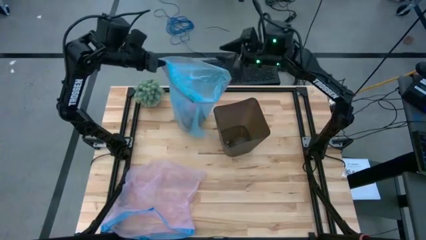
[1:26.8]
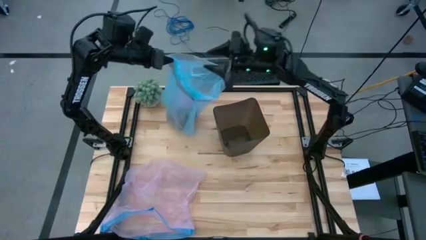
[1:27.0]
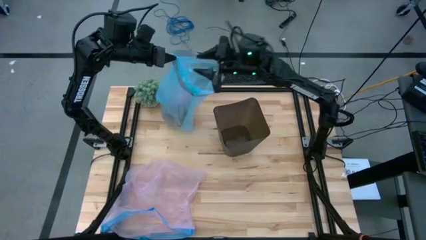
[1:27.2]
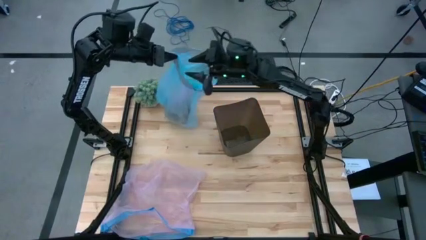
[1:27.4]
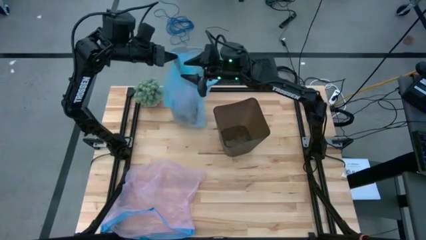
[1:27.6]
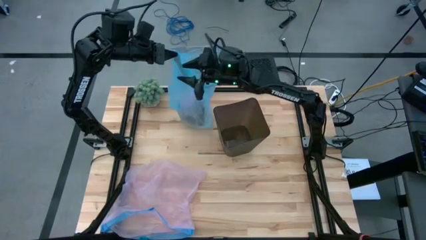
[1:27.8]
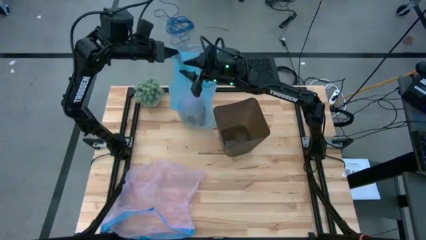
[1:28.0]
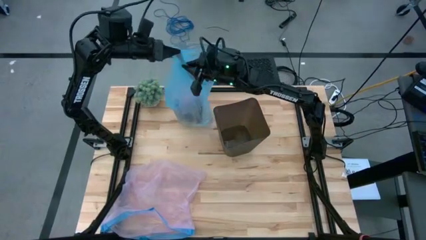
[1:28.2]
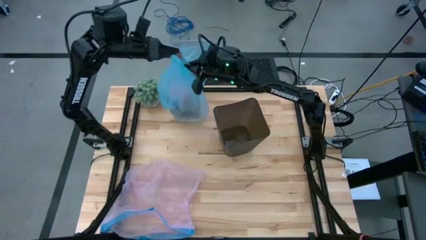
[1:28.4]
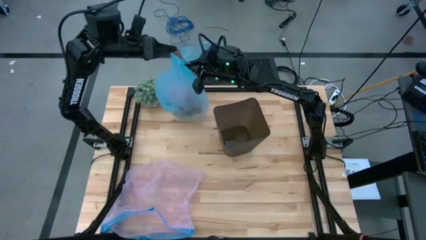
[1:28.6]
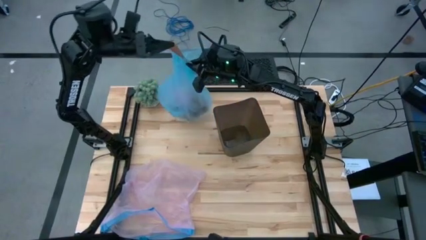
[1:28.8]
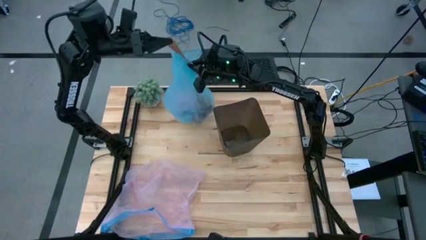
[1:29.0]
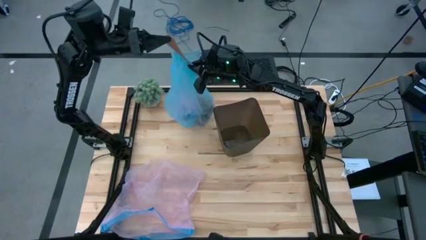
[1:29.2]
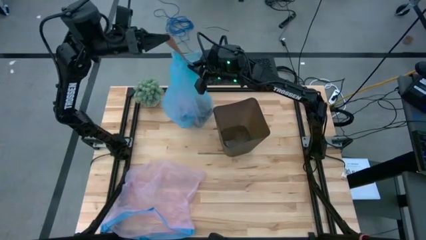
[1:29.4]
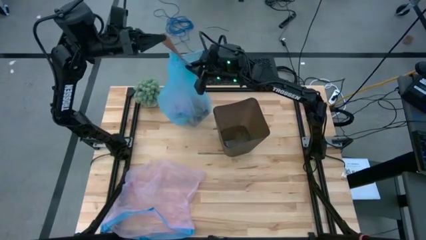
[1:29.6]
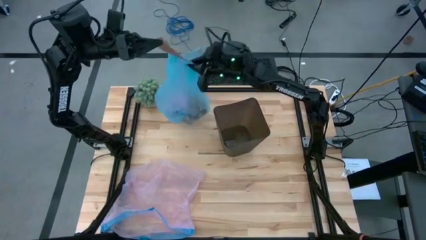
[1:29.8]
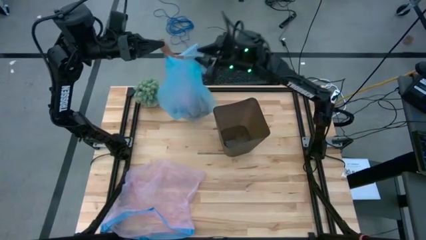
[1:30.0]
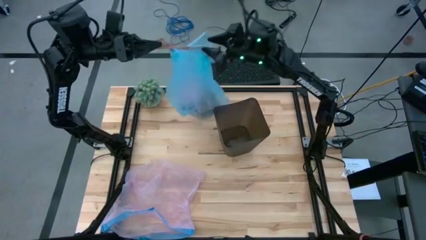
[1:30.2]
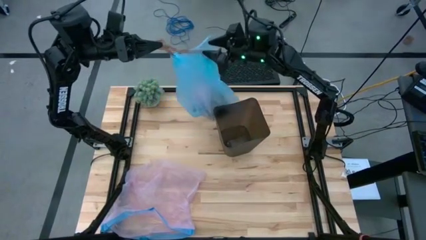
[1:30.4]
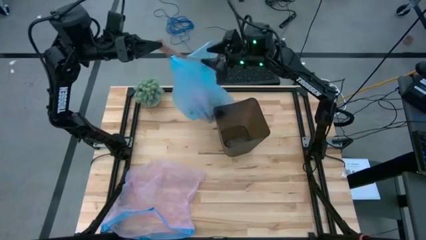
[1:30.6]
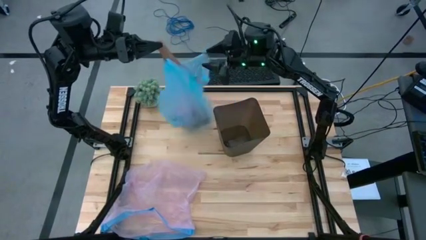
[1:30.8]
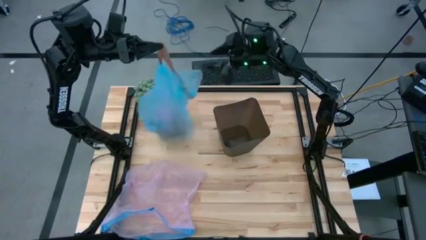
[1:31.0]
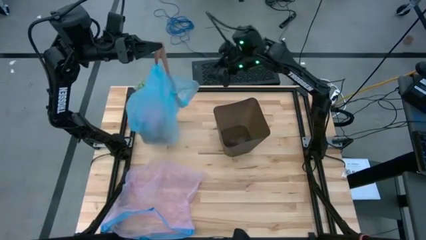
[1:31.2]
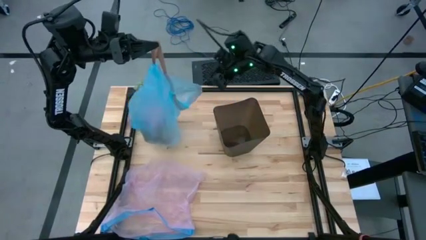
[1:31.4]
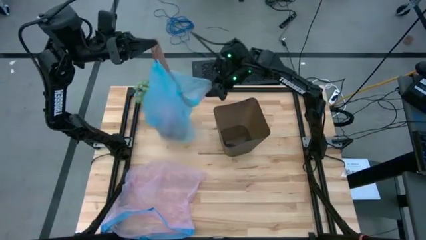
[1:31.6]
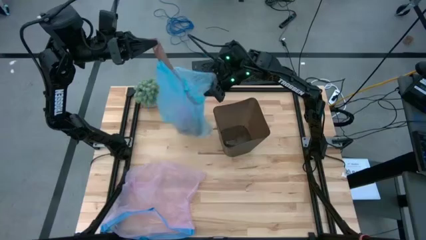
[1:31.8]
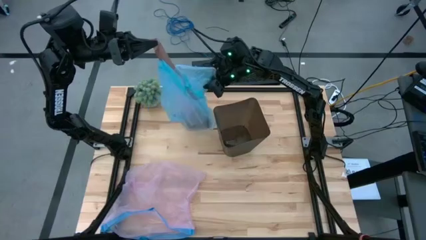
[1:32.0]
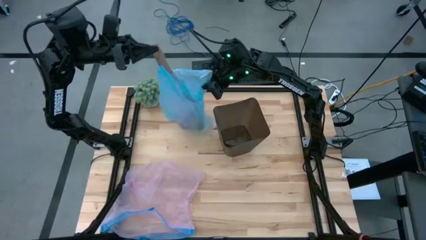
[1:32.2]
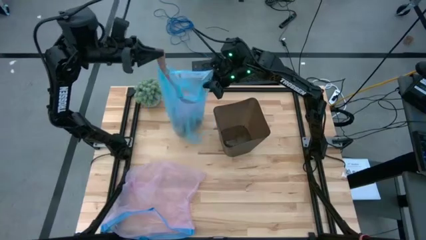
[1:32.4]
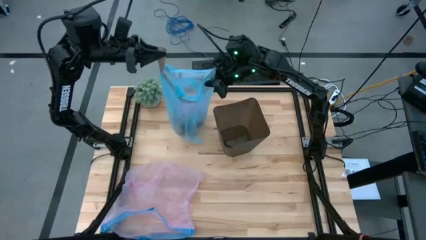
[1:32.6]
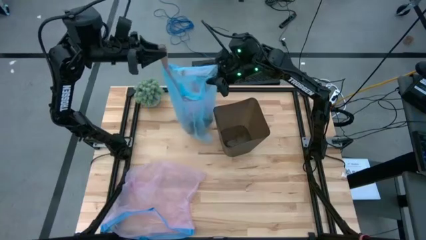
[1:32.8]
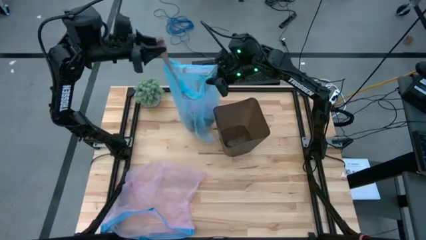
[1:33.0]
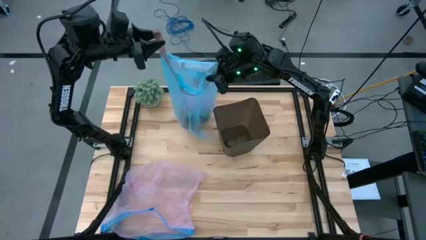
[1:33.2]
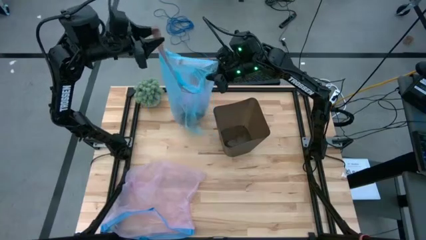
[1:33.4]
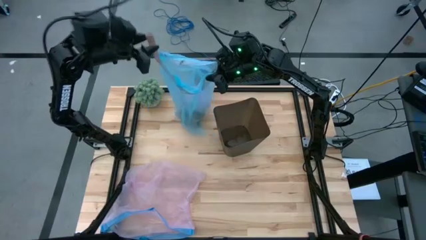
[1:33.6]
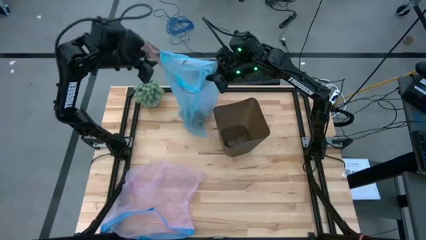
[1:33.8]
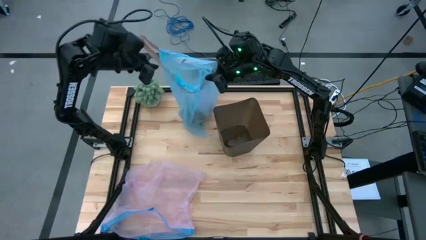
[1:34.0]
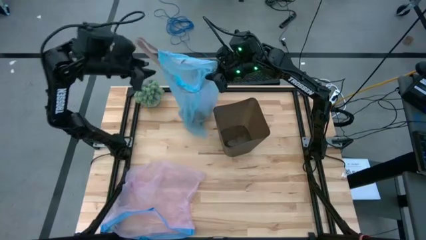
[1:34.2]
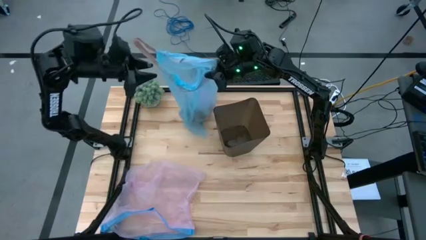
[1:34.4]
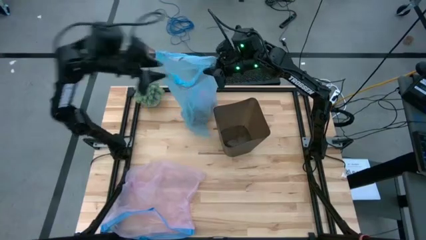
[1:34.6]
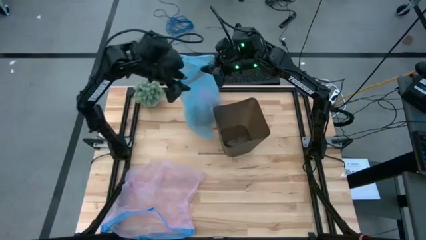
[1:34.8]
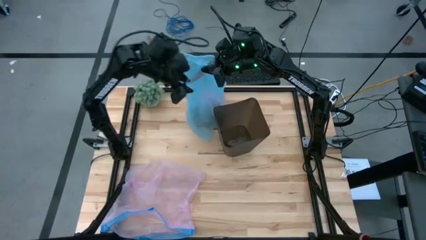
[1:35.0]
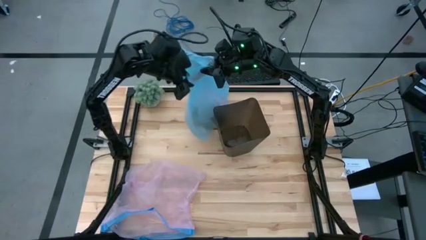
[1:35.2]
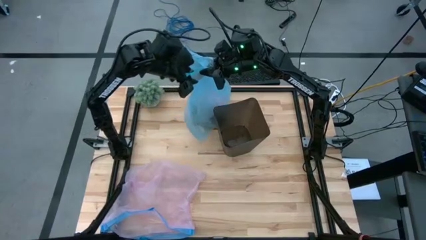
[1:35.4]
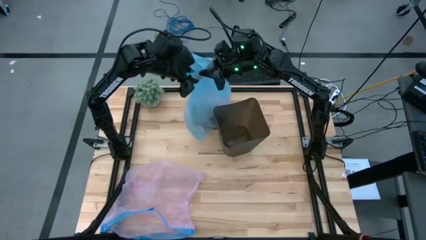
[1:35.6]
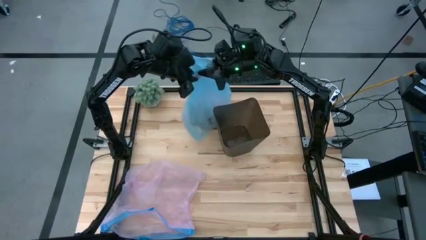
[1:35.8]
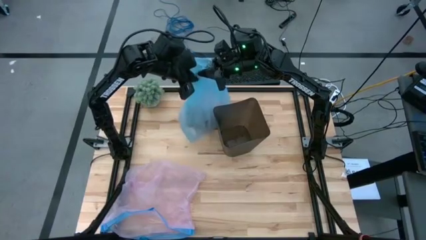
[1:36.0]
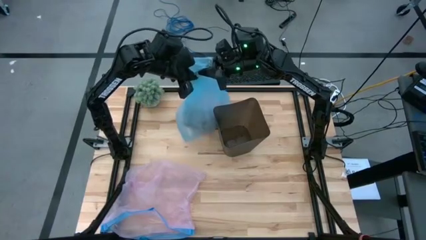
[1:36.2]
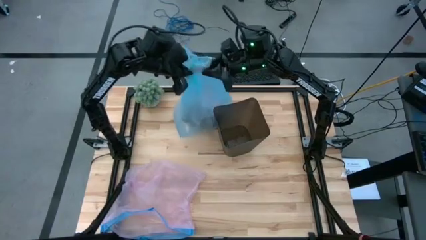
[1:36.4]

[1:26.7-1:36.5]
Task: place trash/remove bag and relplace
Close the blue trash bag

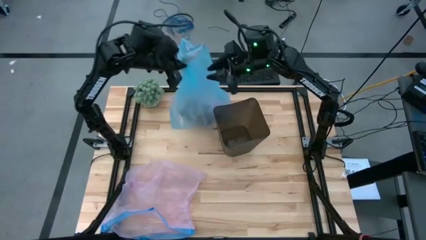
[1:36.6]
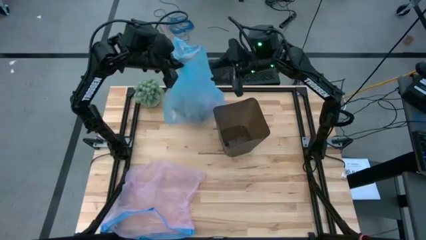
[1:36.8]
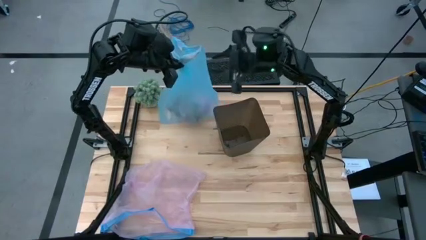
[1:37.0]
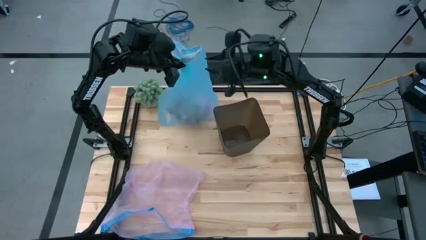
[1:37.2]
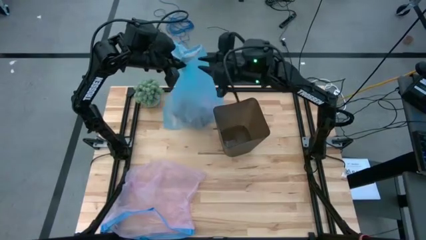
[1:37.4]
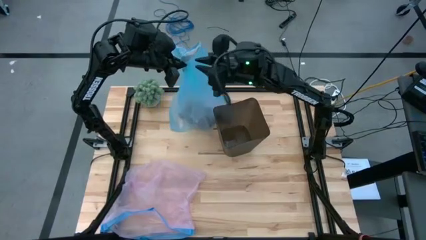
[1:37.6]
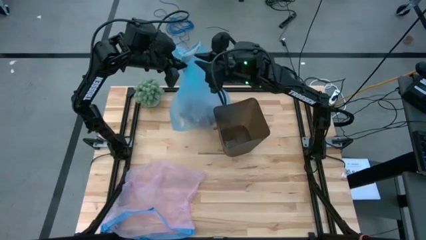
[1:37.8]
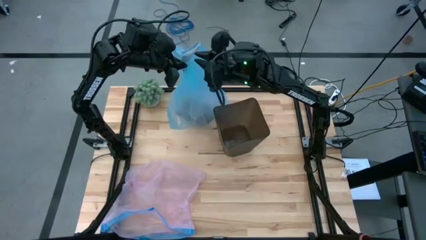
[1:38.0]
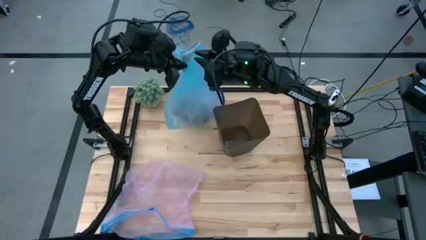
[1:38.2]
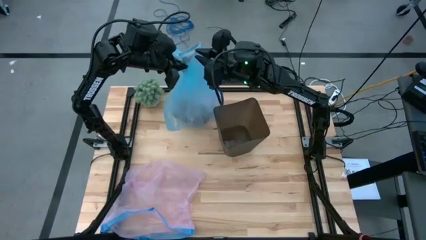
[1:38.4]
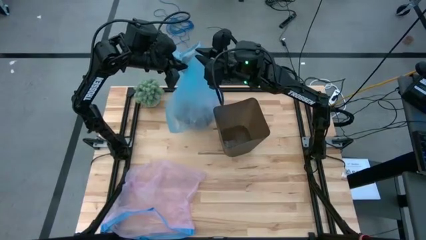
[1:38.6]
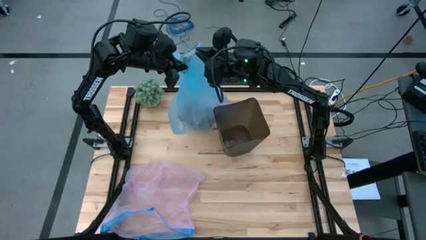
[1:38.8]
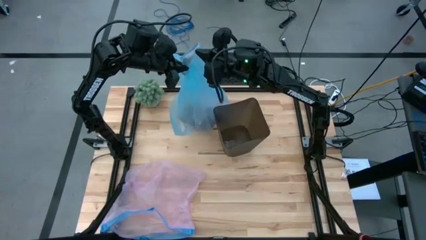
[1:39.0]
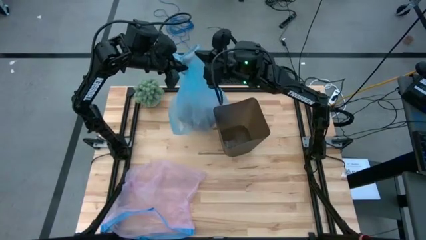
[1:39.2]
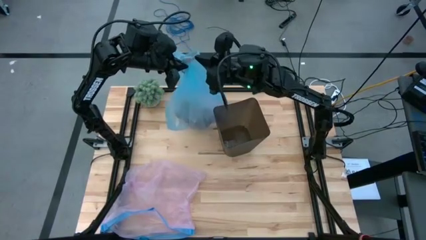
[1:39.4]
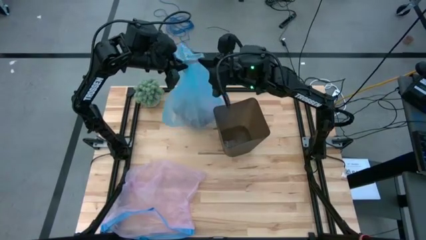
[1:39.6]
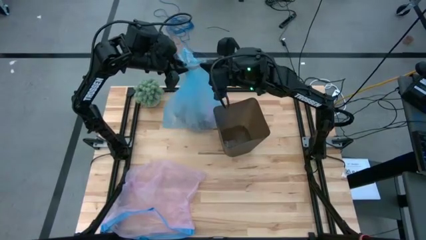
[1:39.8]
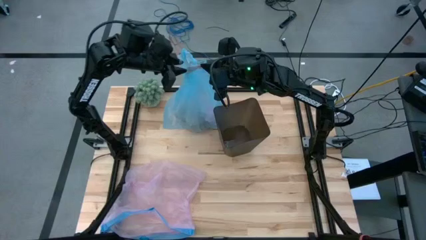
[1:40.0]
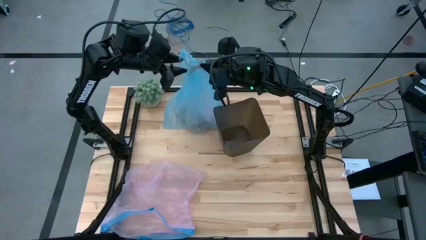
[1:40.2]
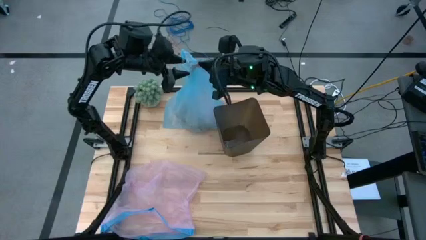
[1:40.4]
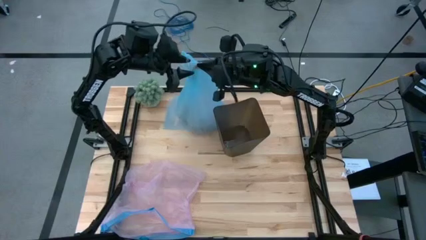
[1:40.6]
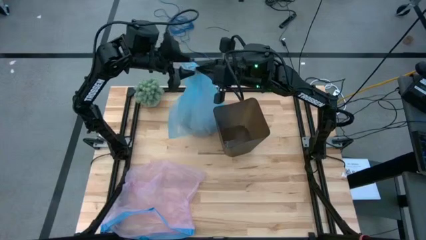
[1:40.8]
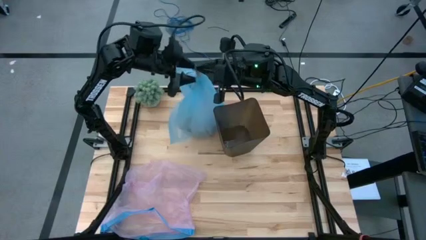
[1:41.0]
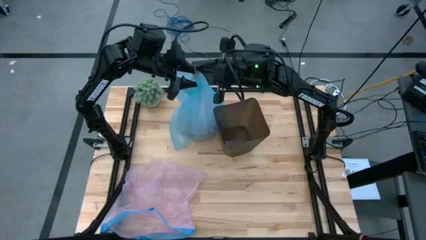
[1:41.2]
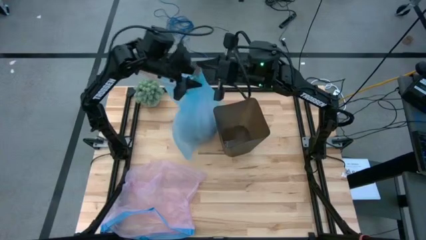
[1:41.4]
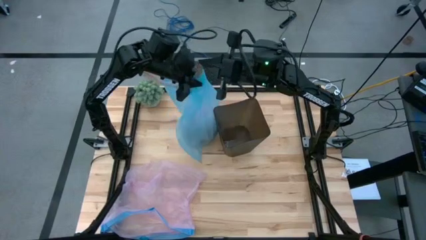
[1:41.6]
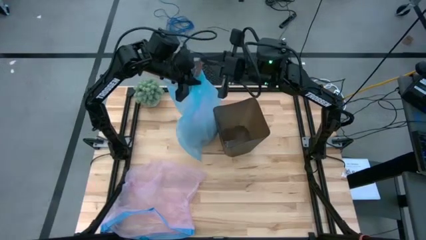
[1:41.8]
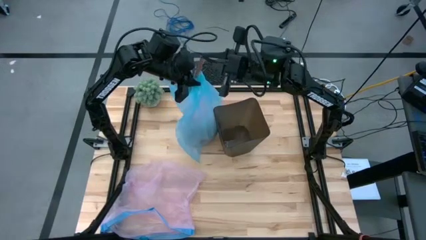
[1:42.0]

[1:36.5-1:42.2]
Close the blue trash bag

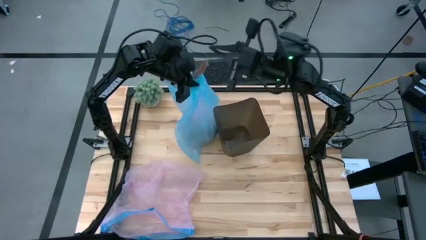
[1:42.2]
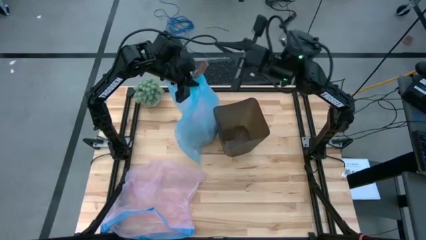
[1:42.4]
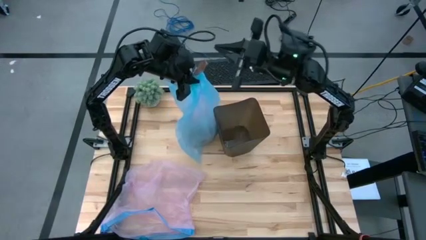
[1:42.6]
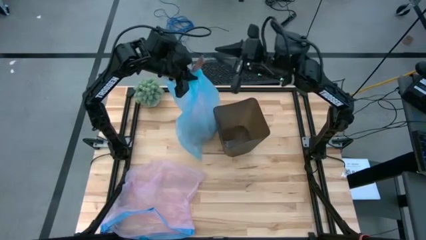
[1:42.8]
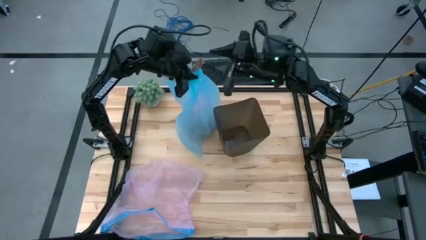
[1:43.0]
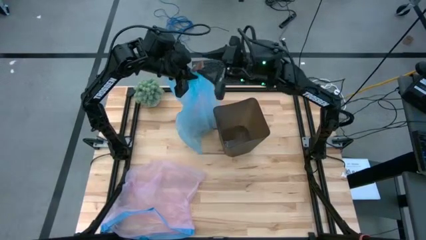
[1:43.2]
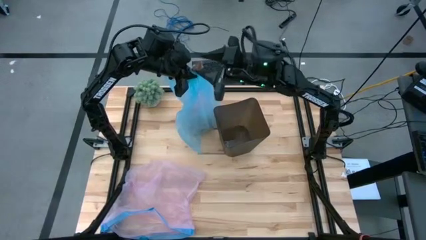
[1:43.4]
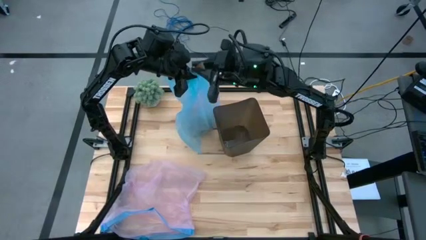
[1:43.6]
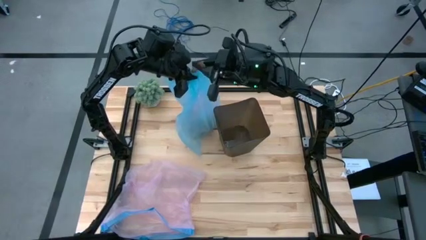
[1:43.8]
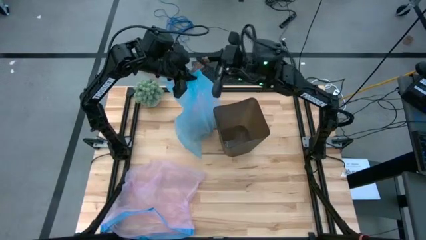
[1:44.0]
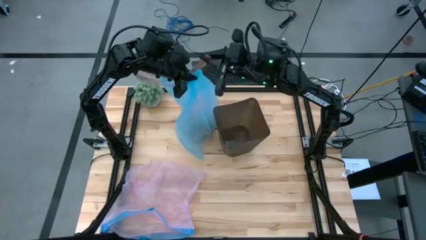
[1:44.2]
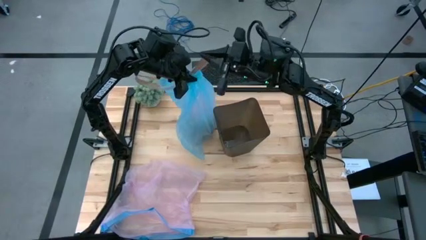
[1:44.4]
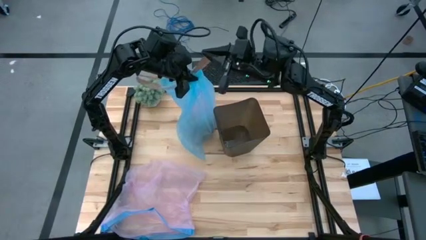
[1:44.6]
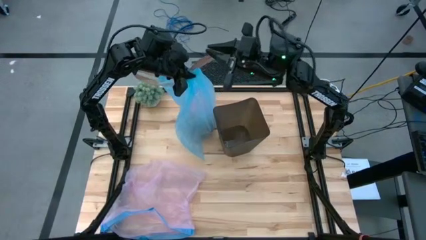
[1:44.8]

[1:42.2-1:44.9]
Close the blue trash bag
